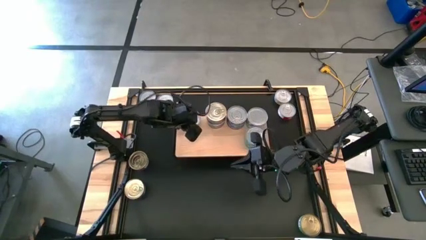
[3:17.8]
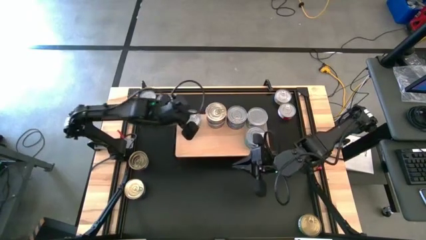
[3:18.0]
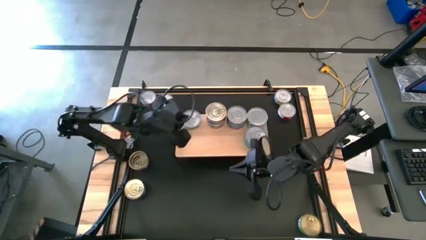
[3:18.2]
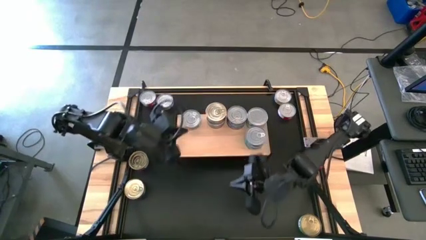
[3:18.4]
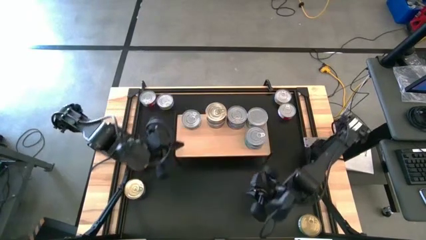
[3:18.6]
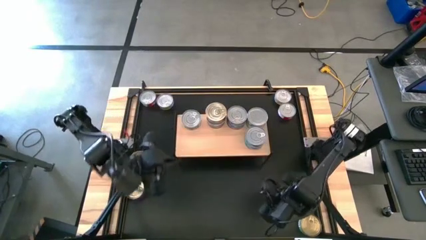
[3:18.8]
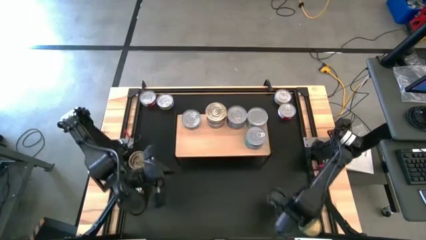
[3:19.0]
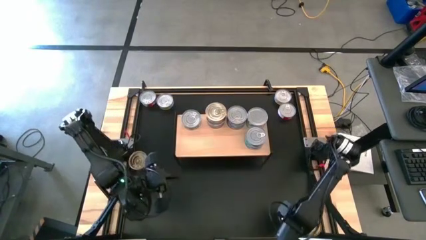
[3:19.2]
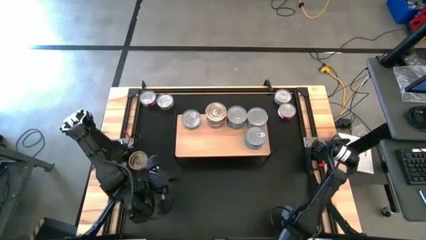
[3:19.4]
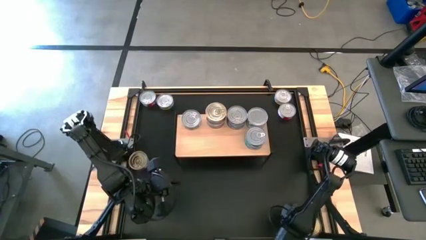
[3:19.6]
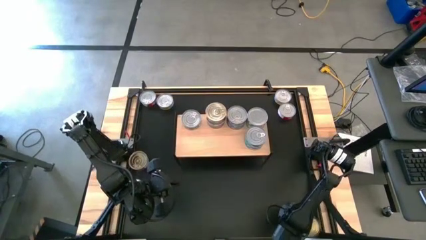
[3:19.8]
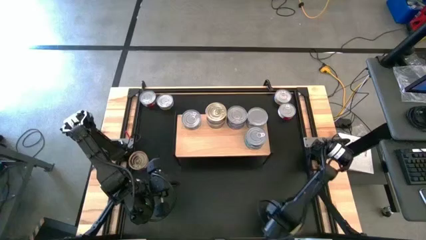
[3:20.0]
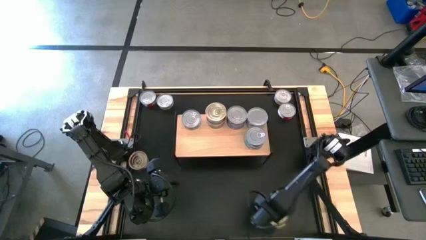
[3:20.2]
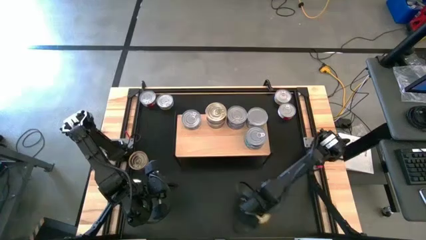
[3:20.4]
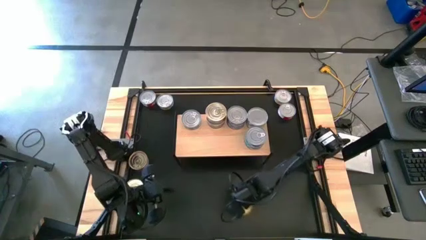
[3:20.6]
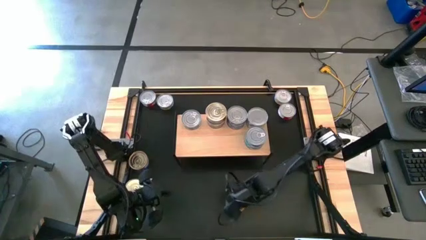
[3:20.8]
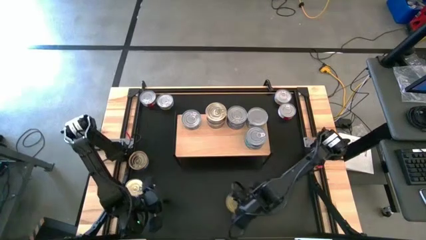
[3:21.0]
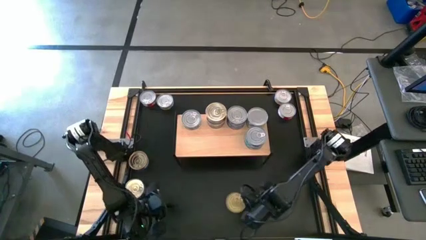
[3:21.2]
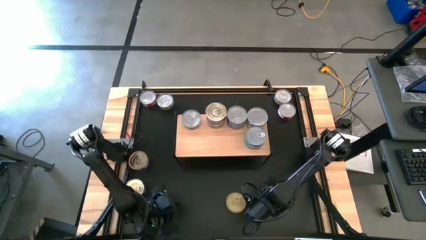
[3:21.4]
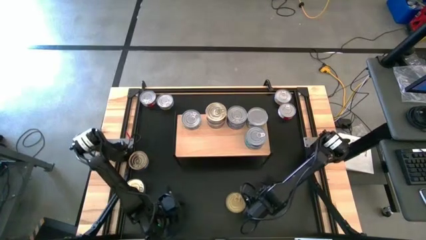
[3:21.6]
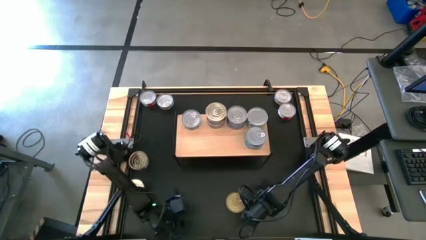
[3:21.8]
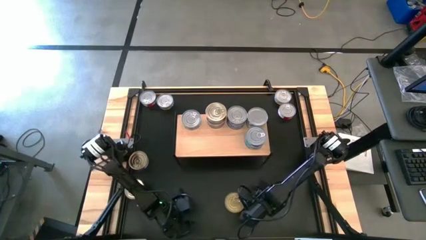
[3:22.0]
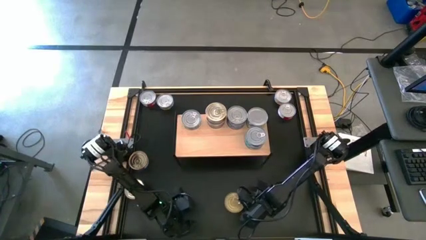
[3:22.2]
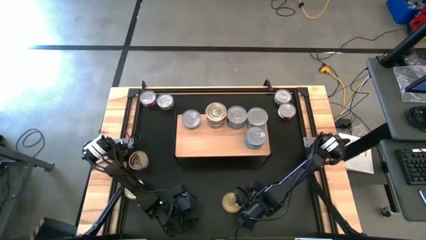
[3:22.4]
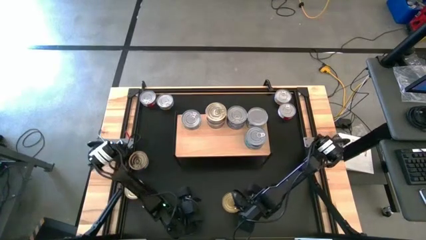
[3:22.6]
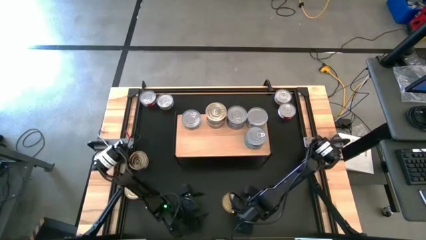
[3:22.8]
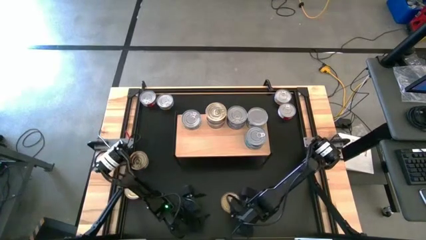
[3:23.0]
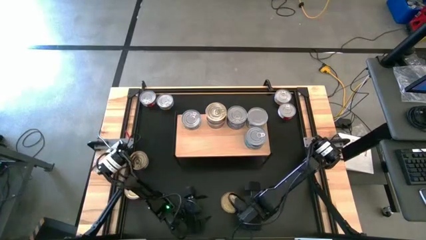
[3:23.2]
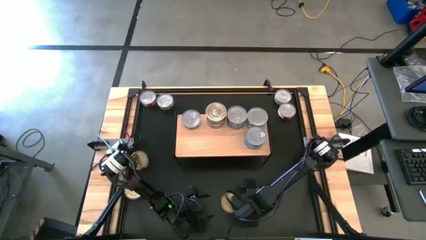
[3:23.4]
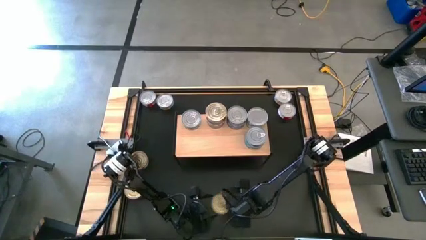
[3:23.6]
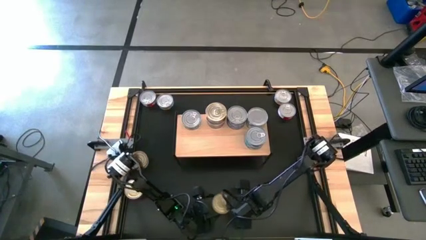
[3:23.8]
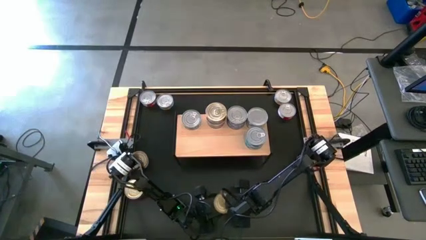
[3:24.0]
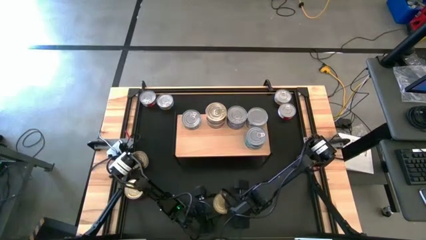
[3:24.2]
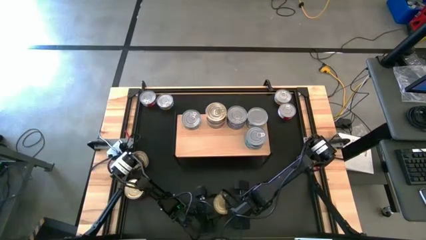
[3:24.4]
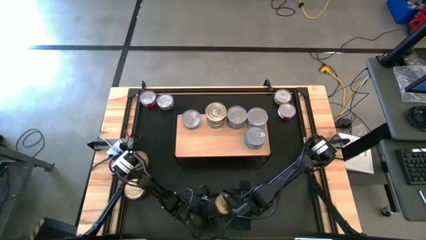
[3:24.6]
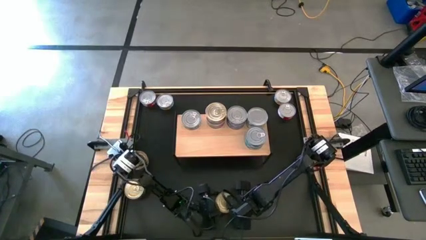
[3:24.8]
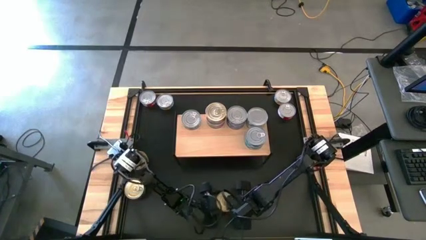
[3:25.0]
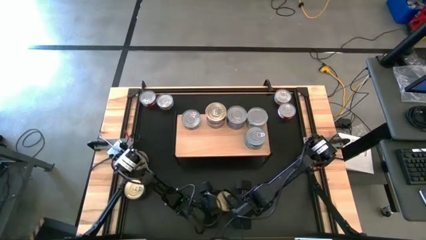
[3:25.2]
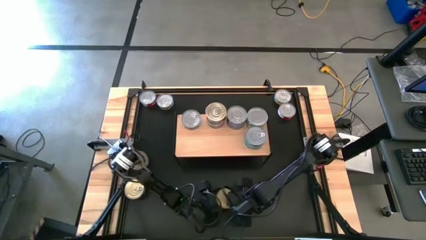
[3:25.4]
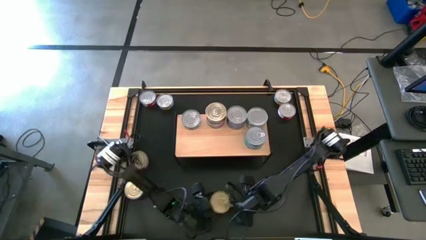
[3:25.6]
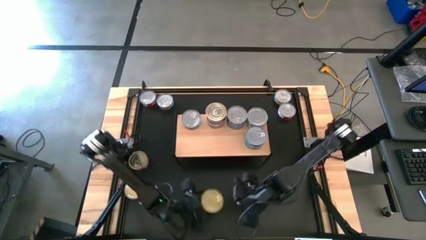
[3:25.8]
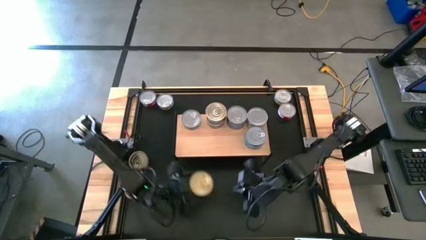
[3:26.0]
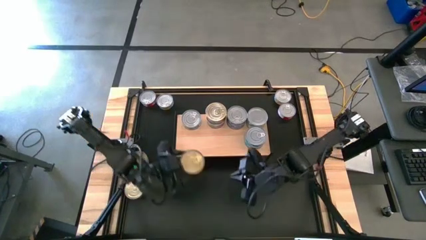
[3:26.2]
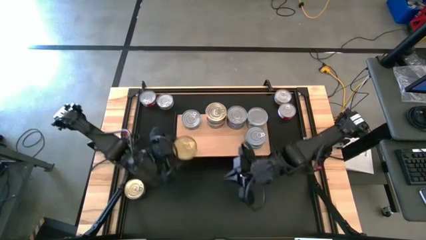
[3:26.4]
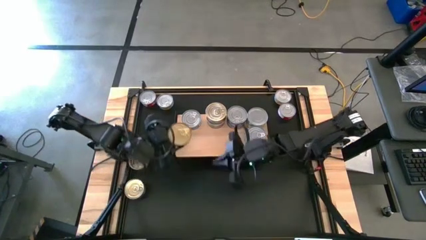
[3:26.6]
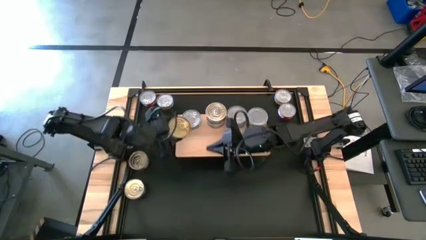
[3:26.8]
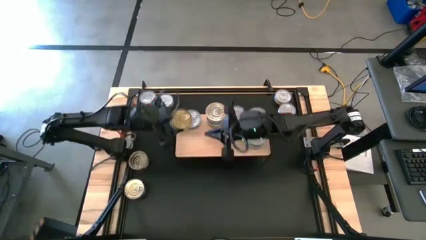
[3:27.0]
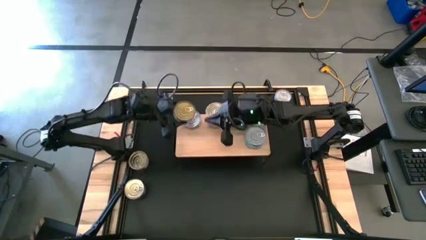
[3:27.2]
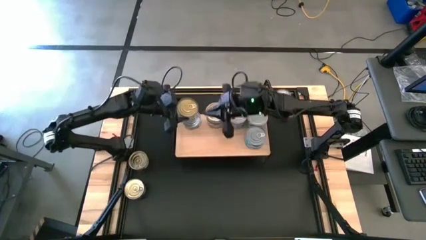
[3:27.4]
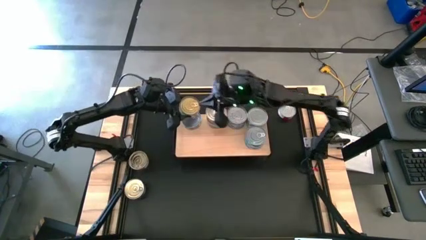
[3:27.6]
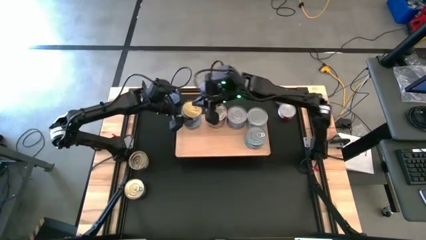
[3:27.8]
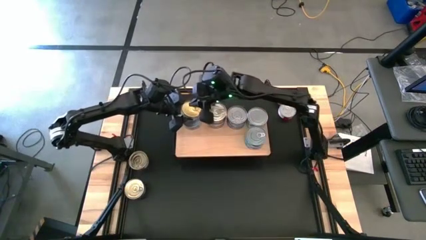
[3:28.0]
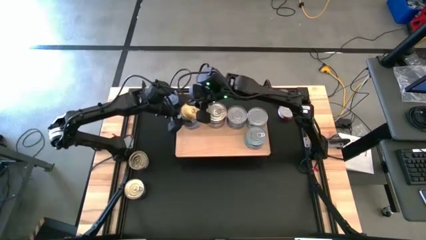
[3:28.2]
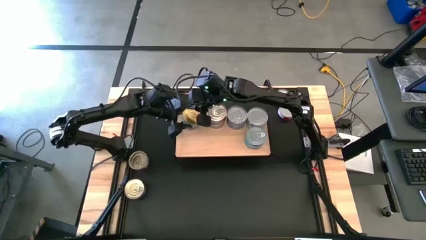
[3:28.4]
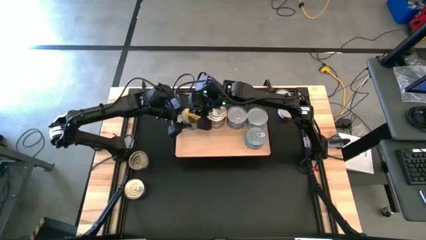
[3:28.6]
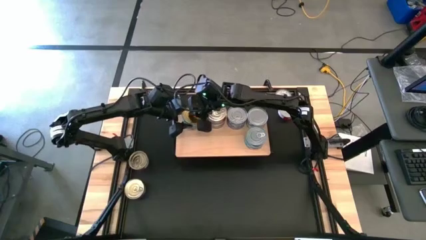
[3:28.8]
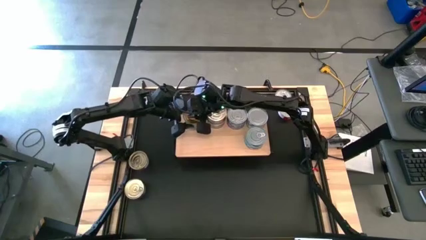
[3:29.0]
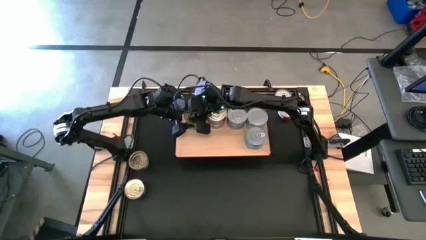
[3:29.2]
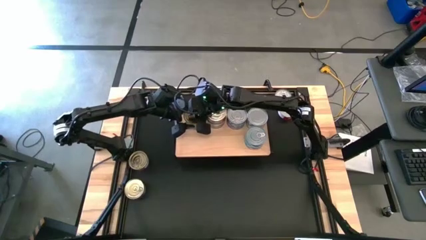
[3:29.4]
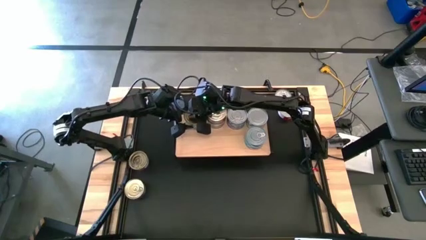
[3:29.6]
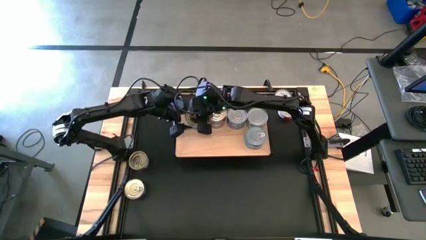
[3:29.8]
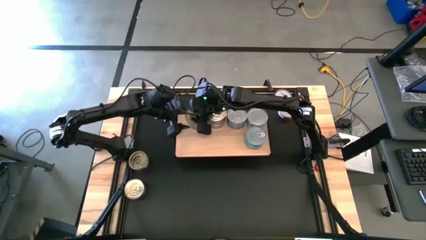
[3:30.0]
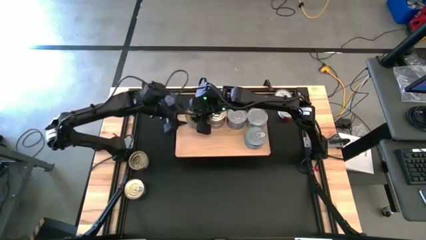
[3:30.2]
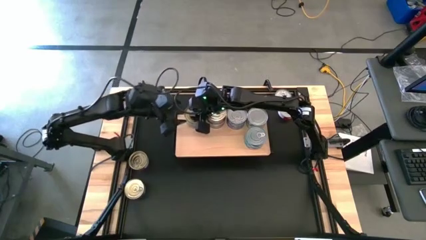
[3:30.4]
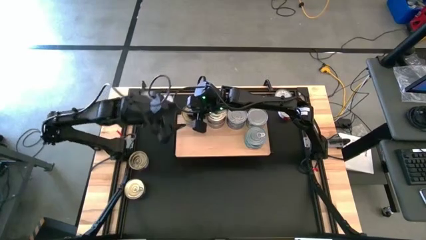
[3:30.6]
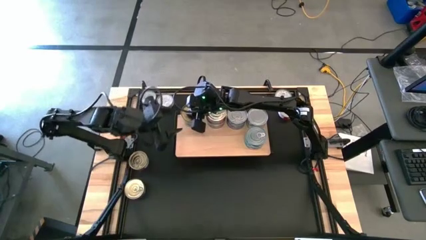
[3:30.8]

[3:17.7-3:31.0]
Task: Stack canned seafood by type on shelf
Stack the green tuna can on top of the green tuna can on the shelf

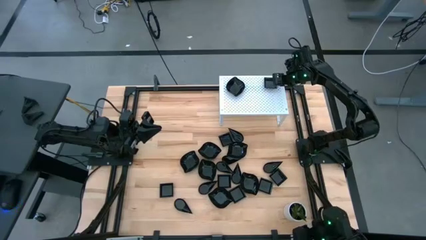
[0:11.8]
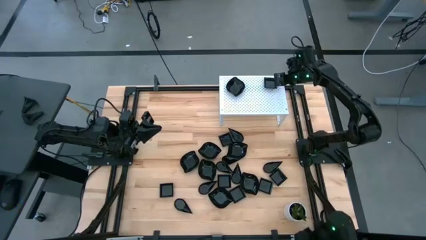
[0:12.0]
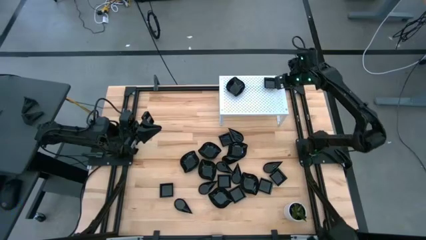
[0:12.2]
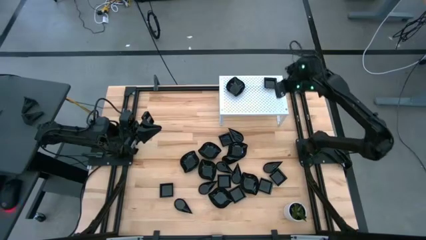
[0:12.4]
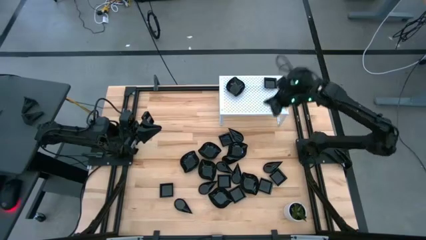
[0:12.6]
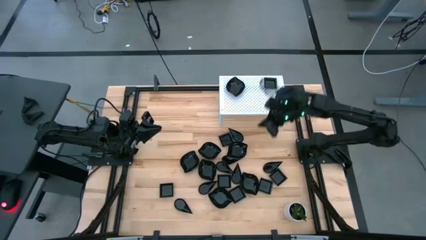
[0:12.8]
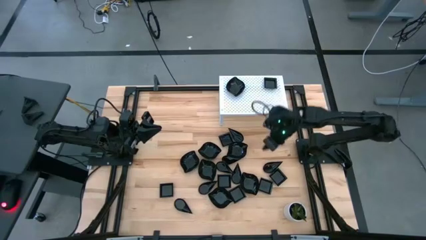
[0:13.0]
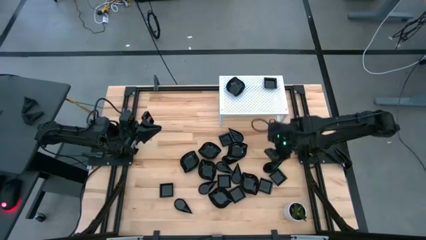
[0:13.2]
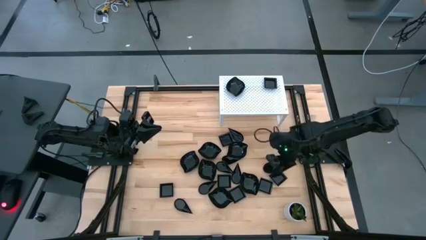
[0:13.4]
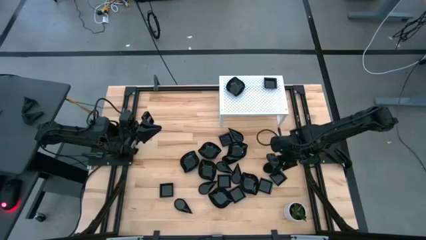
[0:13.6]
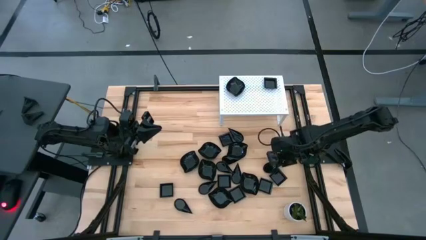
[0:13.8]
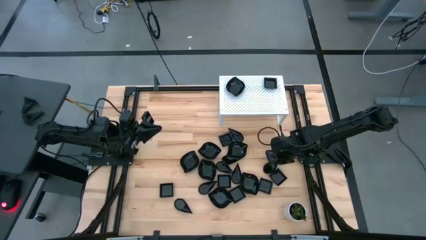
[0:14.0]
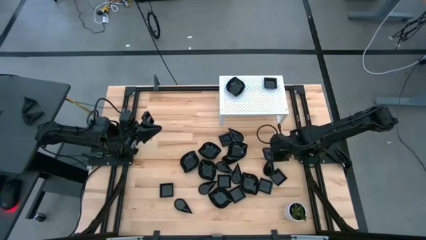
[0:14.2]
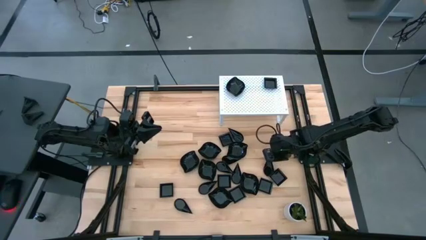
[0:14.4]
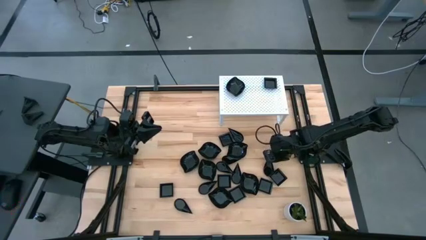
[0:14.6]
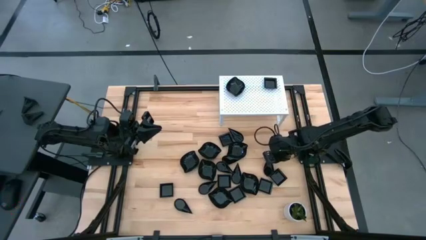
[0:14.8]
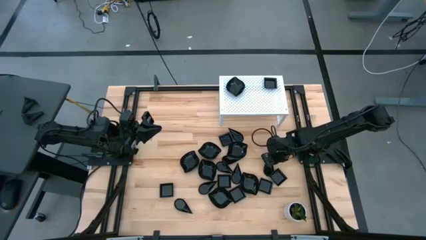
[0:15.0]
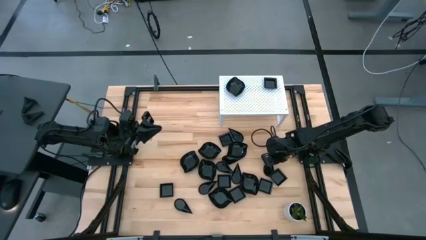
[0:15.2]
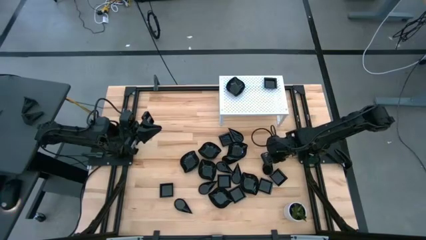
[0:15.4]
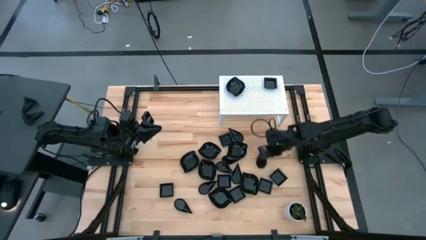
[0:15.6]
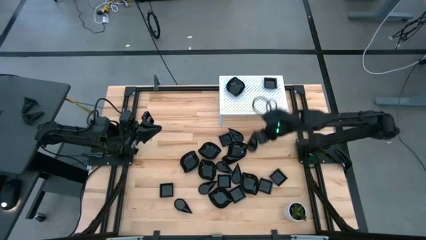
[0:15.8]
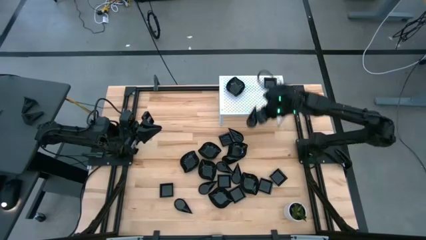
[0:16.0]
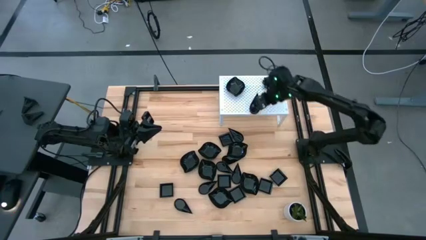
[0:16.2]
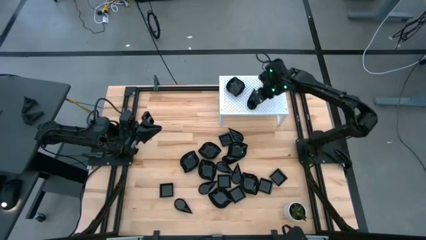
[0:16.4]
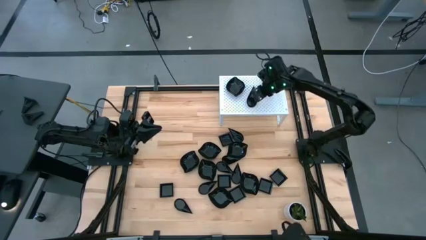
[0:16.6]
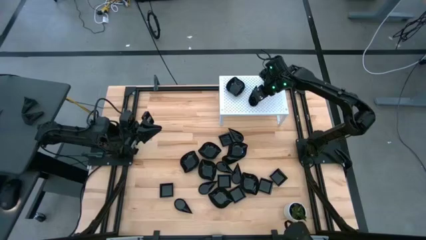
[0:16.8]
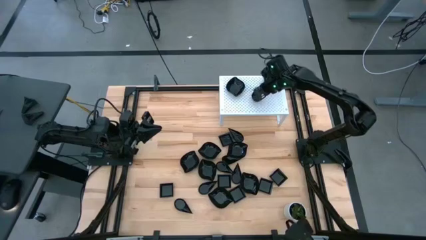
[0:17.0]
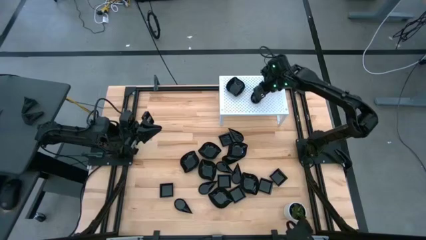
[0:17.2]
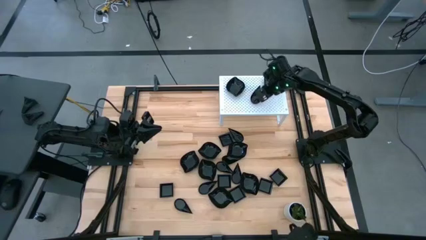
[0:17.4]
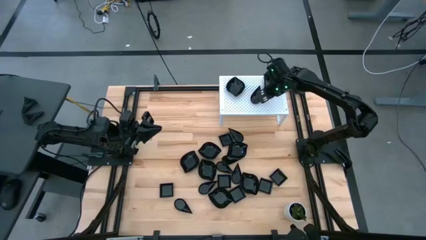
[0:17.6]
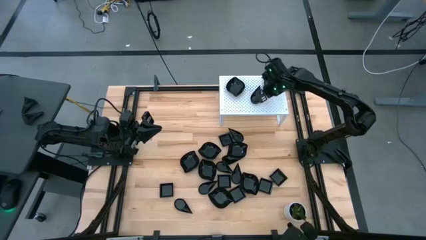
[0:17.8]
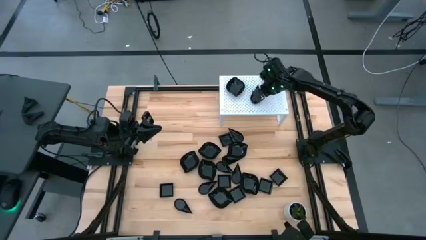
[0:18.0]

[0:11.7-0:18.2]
Task: Pick & Place Mini shaped plates
Put the drop shaped plate on the shelf
